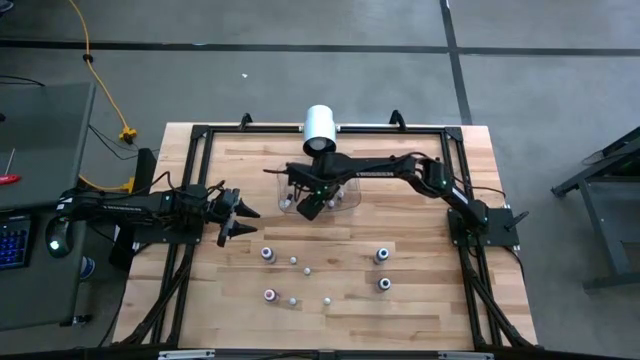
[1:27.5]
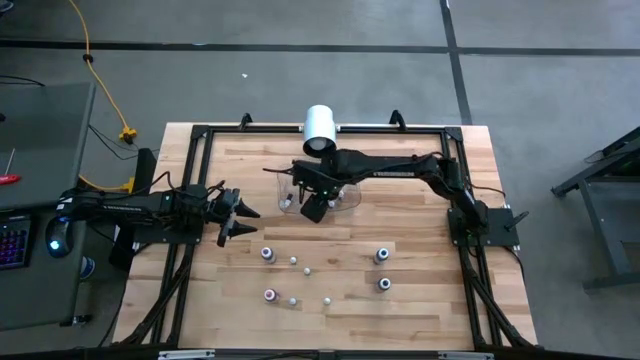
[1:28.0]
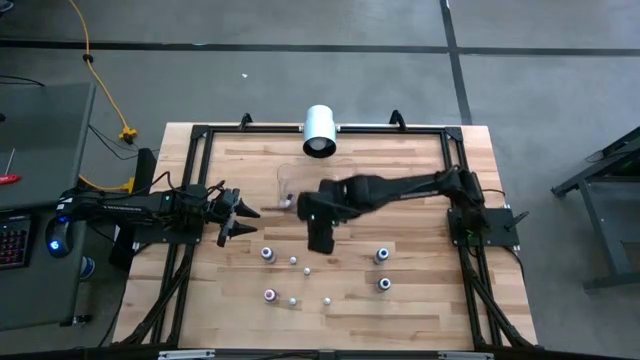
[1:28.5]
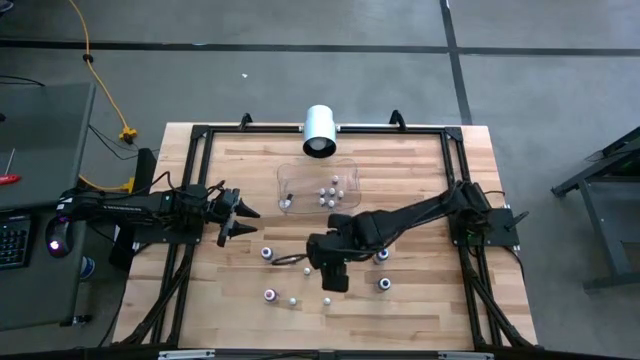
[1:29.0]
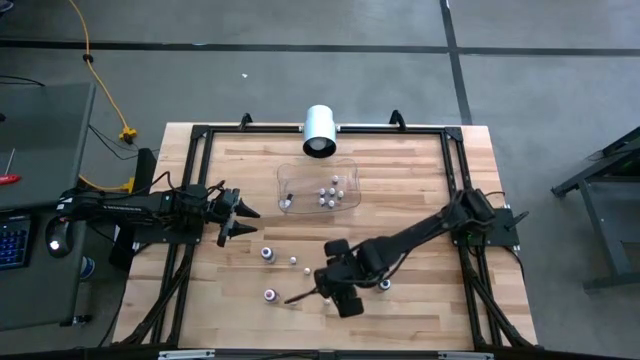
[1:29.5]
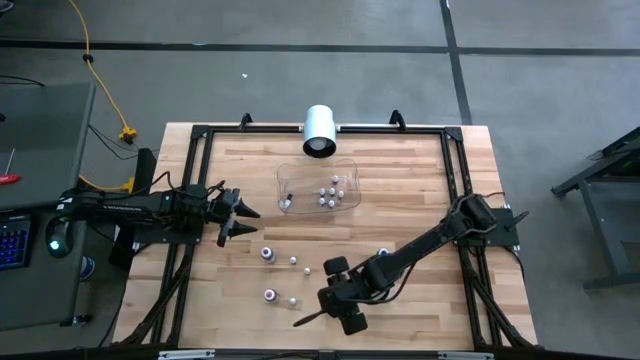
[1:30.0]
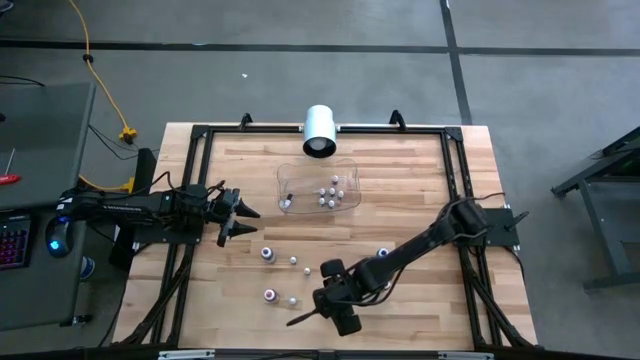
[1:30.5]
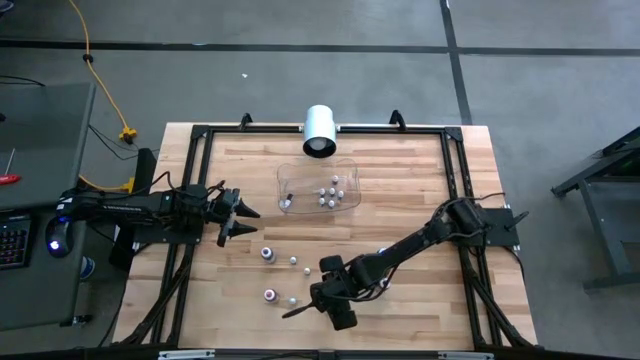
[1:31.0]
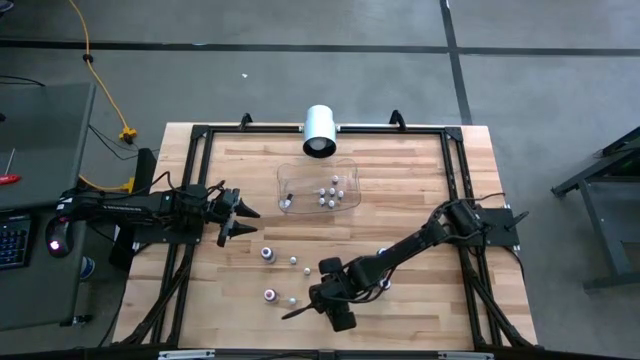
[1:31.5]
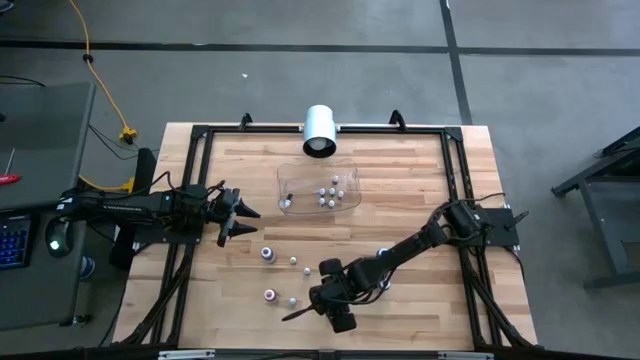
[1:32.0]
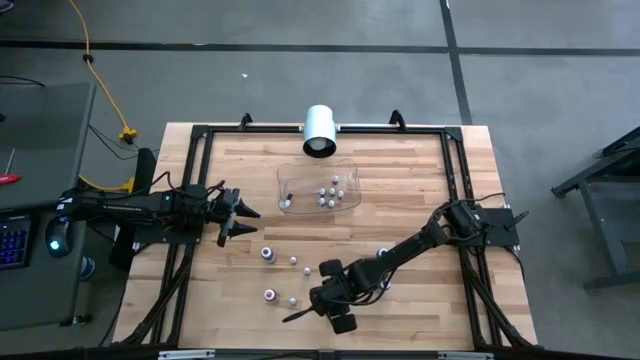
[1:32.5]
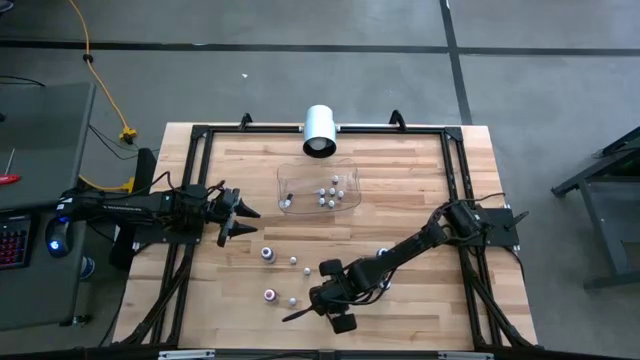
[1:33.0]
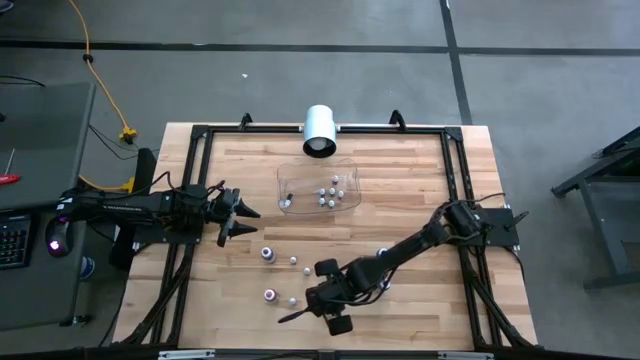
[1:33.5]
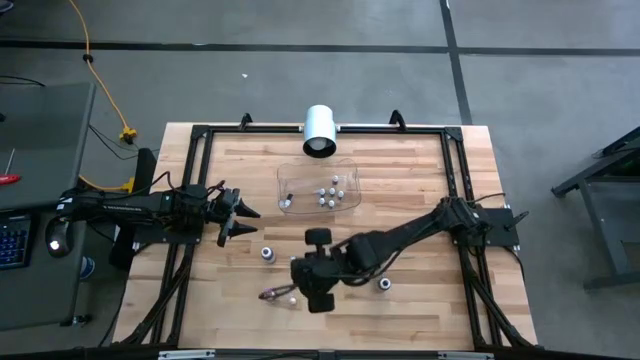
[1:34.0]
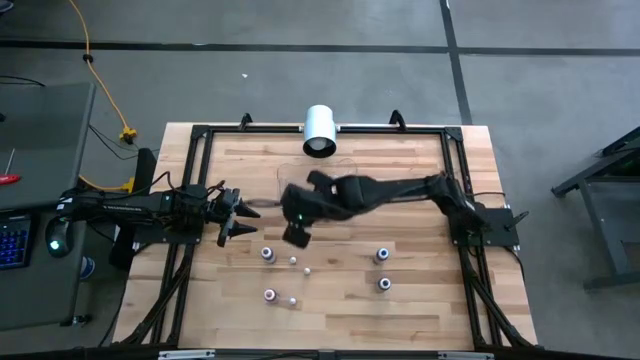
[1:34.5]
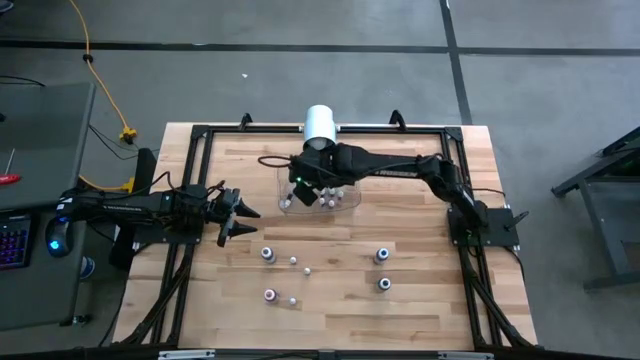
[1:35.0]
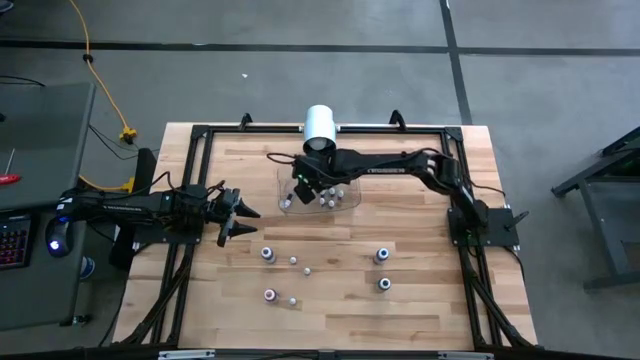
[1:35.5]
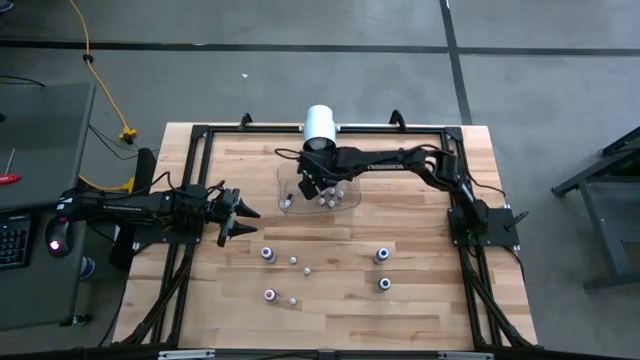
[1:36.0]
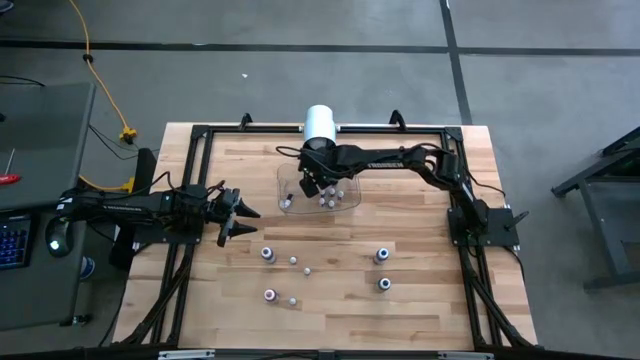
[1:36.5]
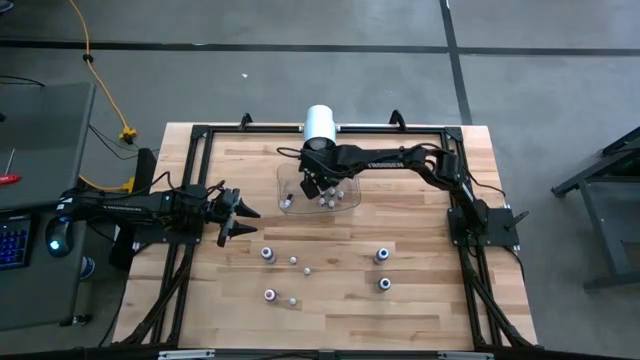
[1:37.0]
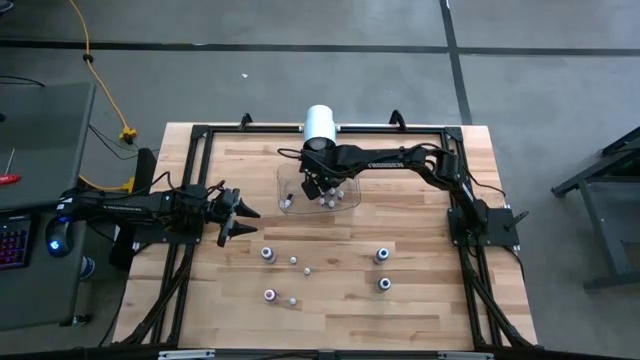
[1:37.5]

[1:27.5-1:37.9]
Task: Pick & Place food coloring
Put the small red food coloring bottle into the transparent bin

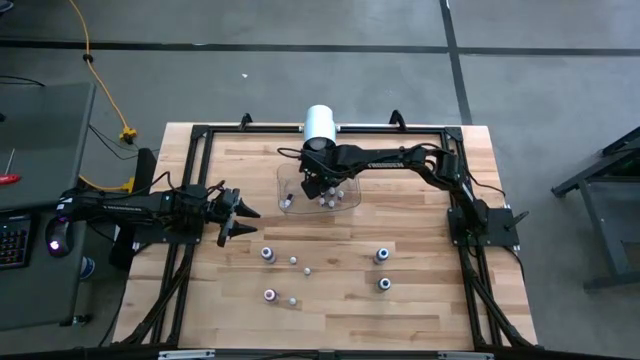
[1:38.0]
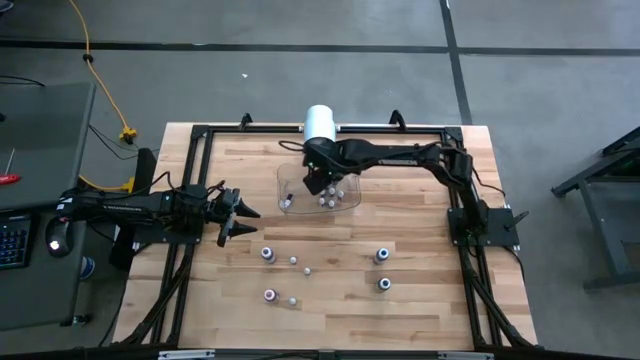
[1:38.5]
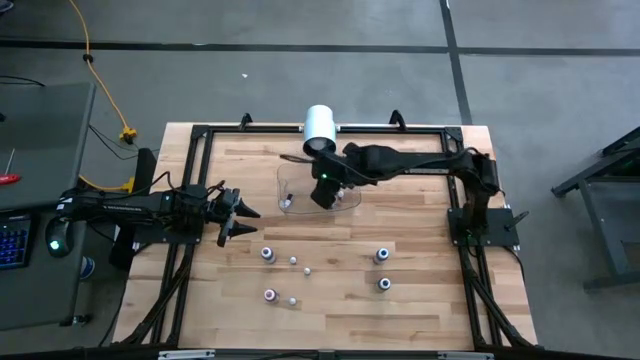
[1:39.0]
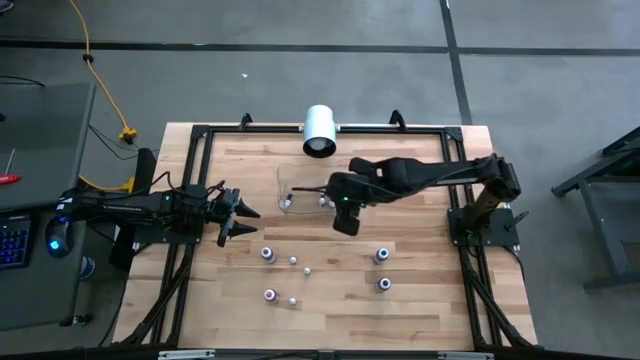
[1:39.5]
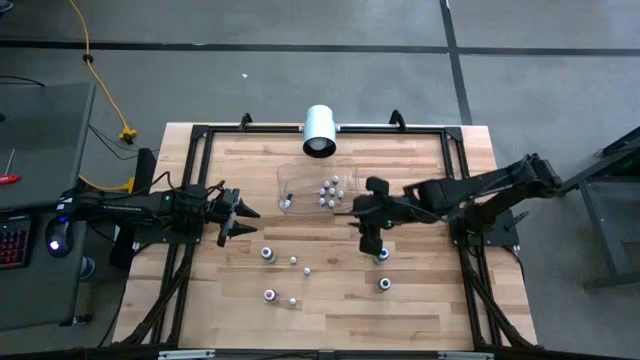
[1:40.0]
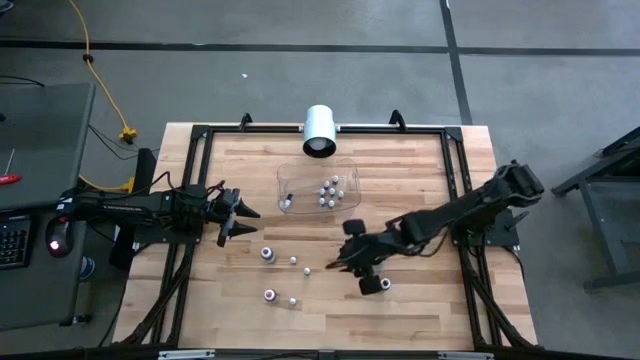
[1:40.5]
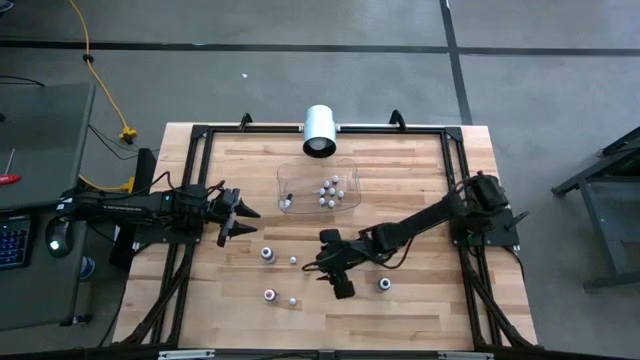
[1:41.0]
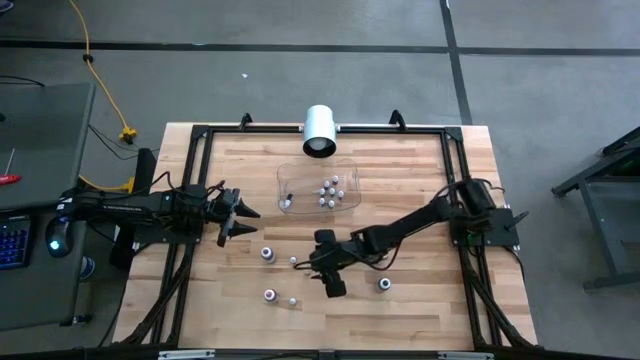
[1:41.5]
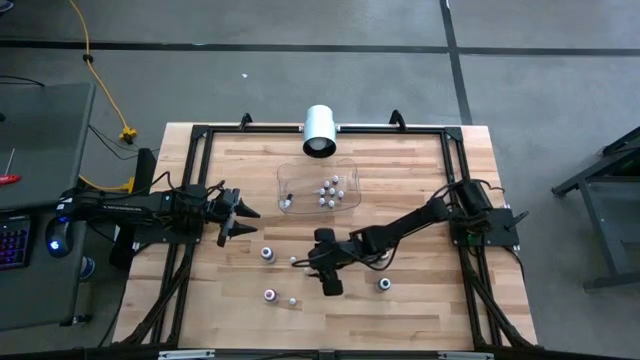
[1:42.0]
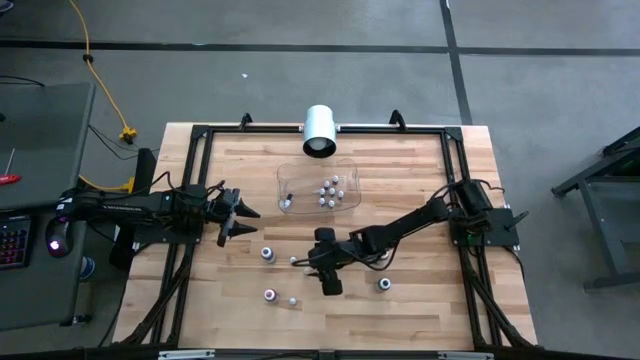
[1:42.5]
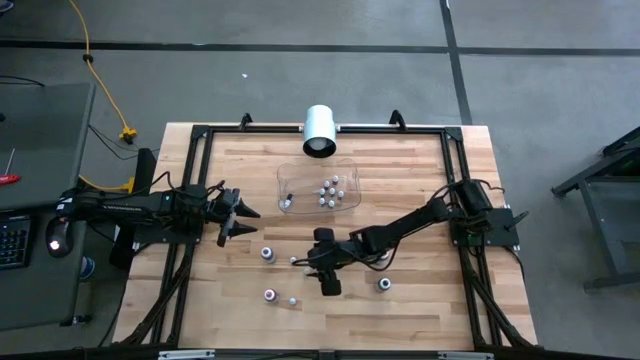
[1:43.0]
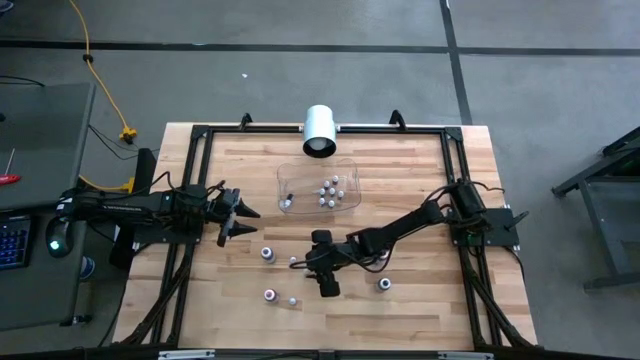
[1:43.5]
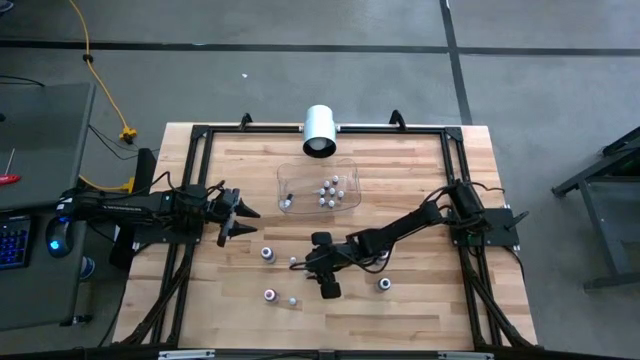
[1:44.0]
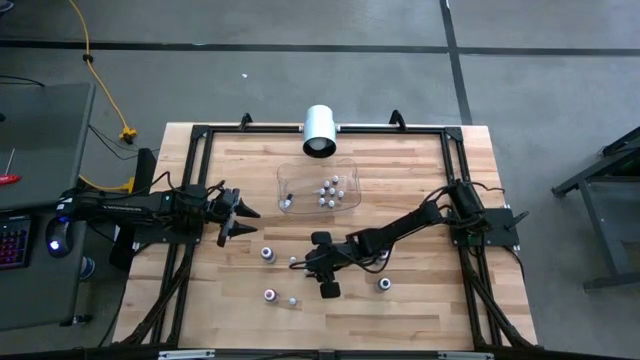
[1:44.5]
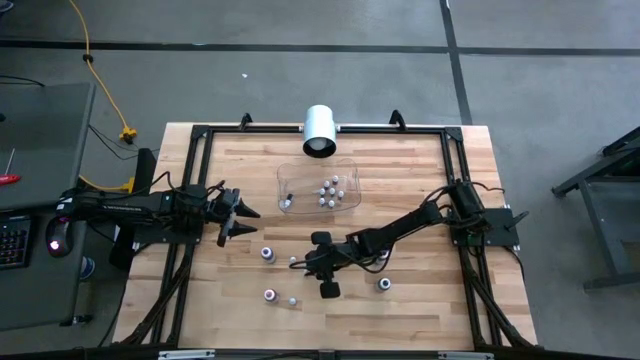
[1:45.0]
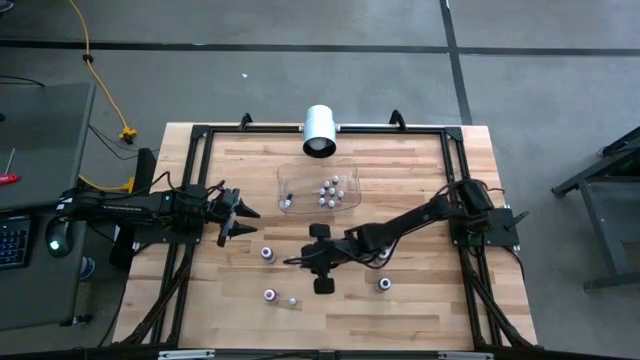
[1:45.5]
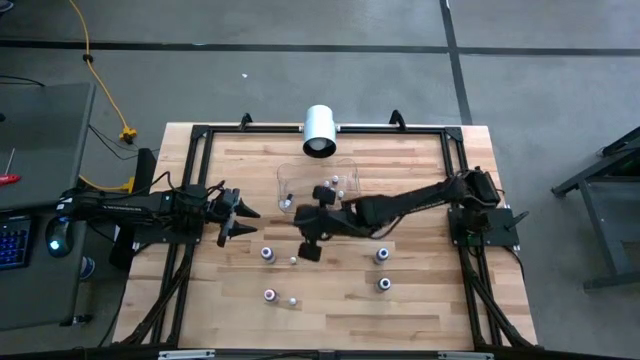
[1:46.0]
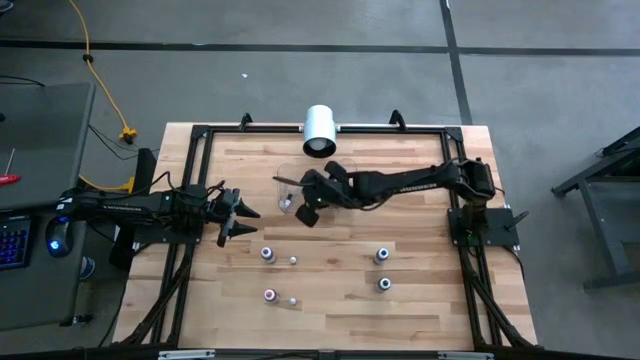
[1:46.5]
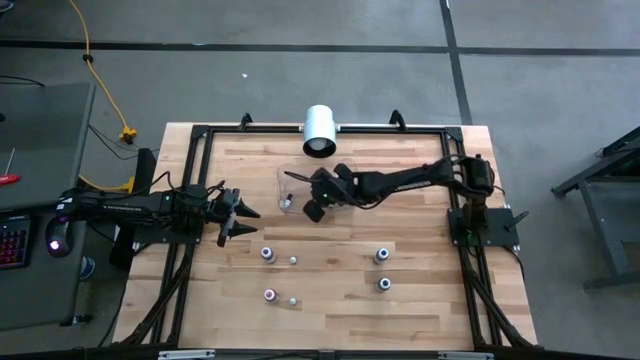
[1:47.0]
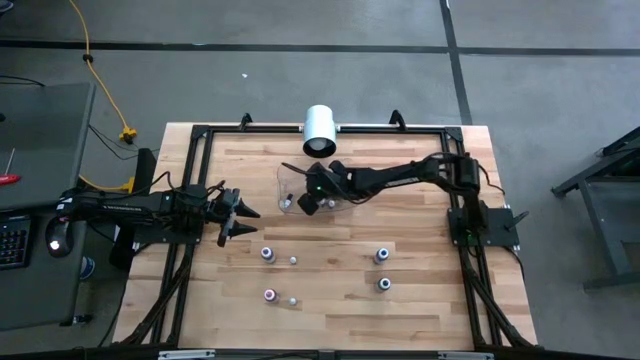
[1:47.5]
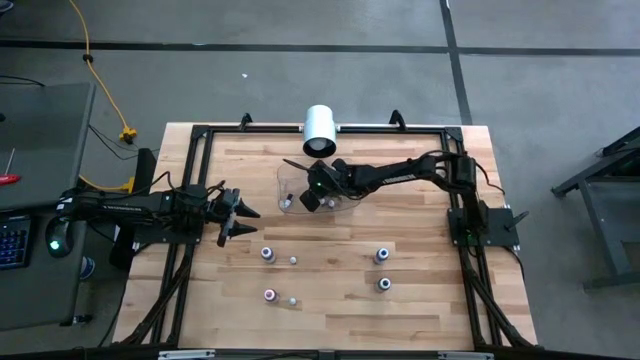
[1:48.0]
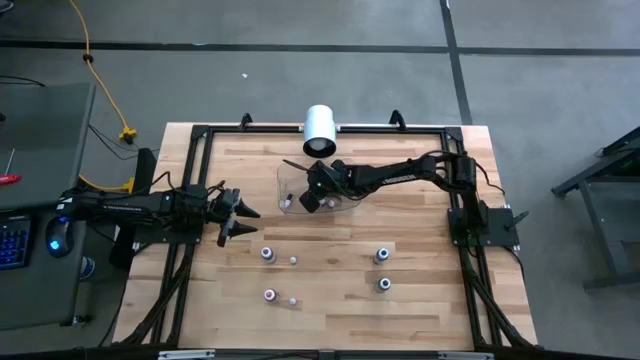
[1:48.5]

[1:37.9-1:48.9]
Put the small green food coloring bottle into the transparent bin

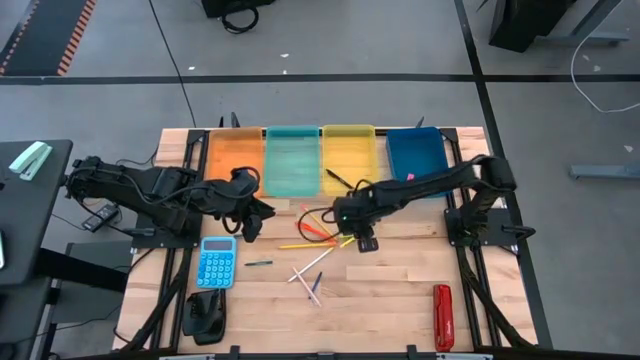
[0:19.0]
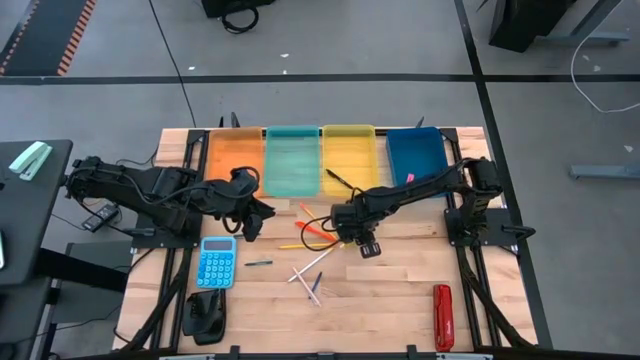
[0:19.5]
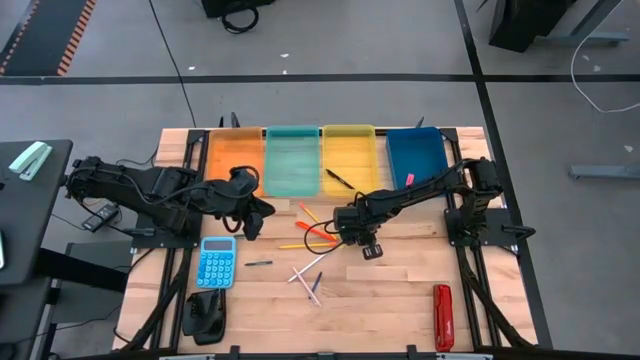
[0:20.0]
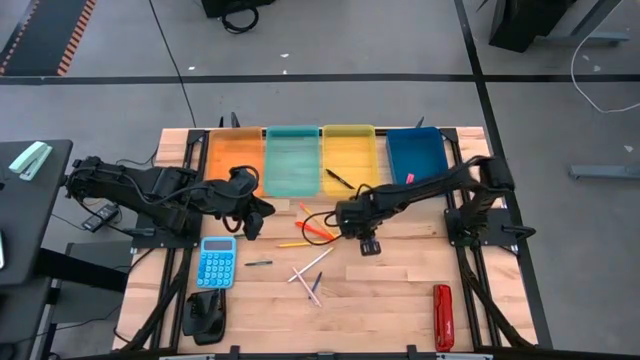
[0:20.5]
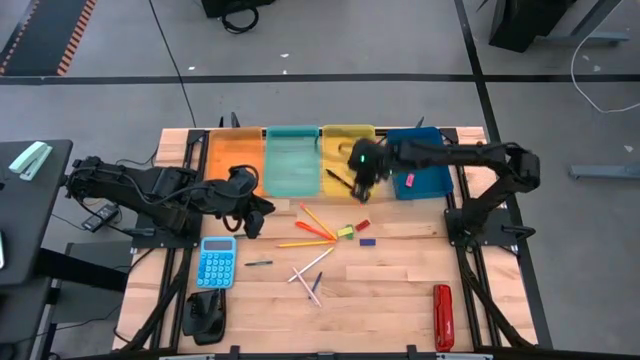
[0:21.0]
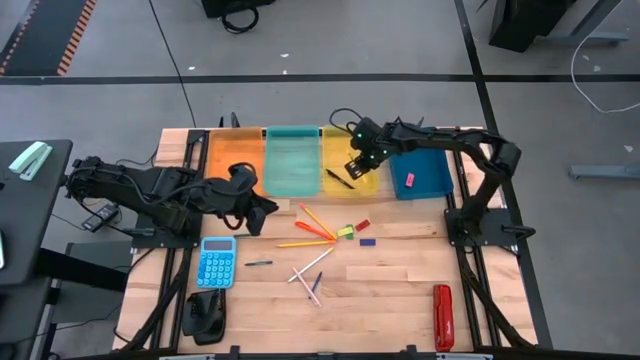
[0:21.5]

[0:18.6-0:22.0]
Task: Sort crayons/erasers/pens/pencils in bins
Put the yellow pen into the yellow bin
